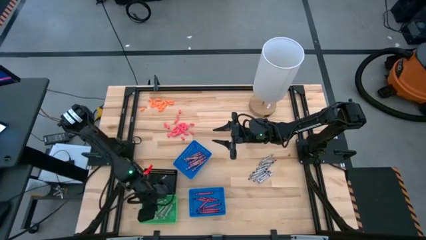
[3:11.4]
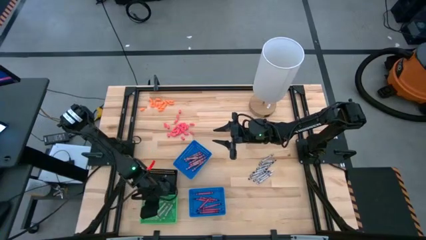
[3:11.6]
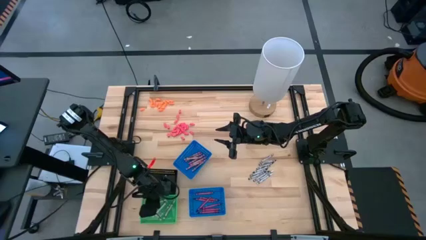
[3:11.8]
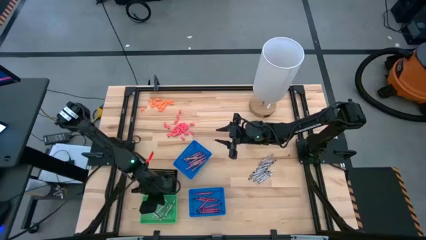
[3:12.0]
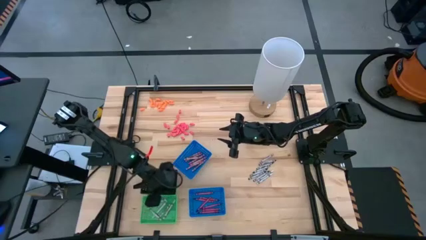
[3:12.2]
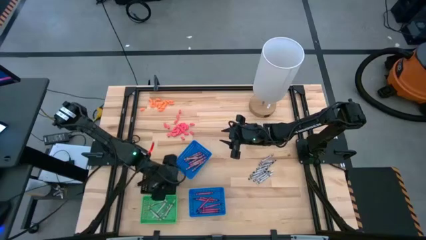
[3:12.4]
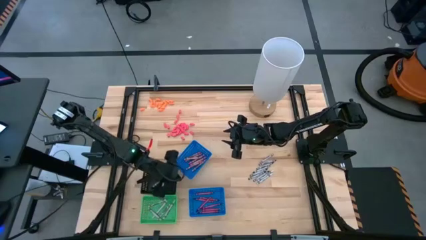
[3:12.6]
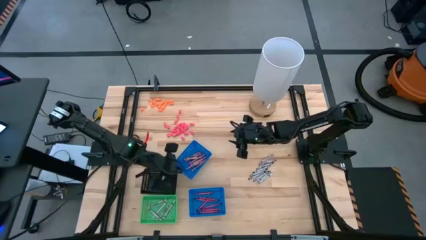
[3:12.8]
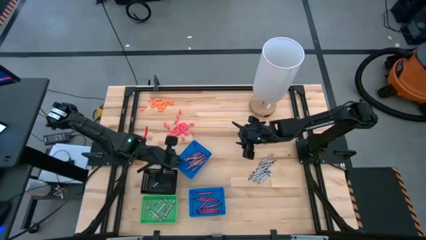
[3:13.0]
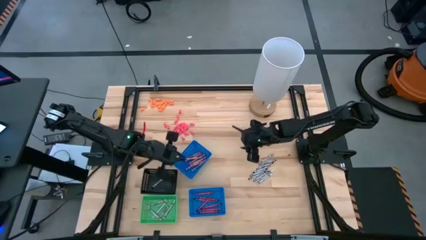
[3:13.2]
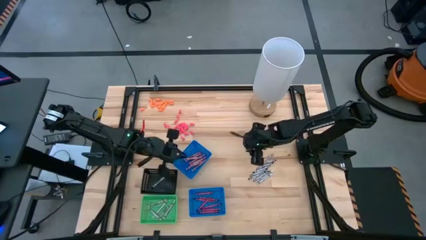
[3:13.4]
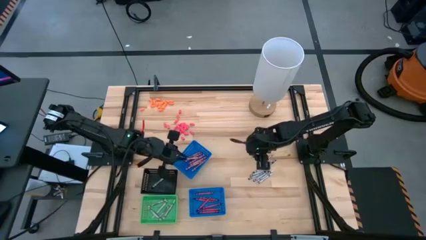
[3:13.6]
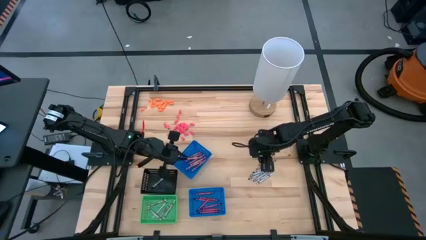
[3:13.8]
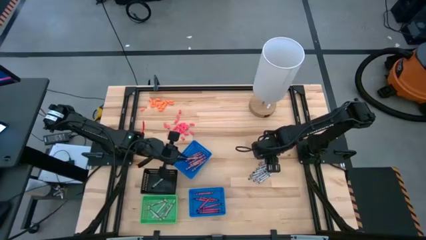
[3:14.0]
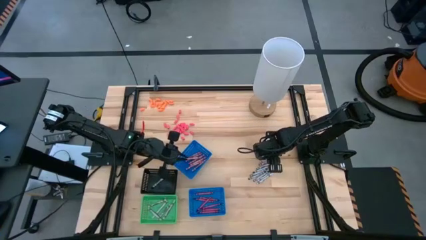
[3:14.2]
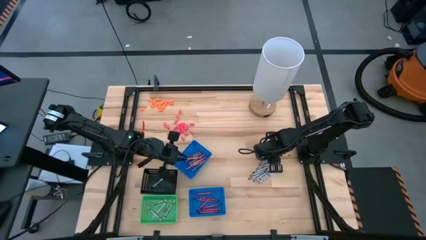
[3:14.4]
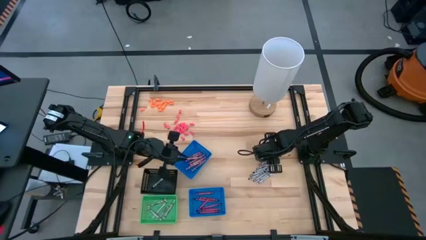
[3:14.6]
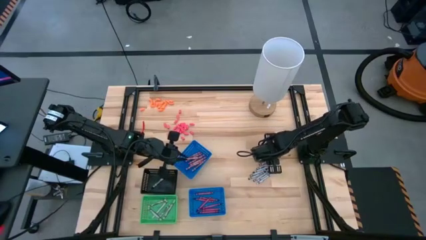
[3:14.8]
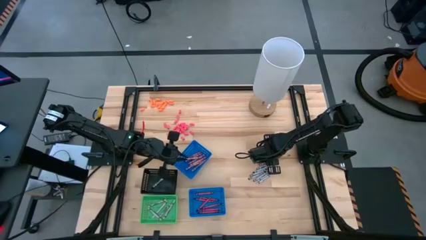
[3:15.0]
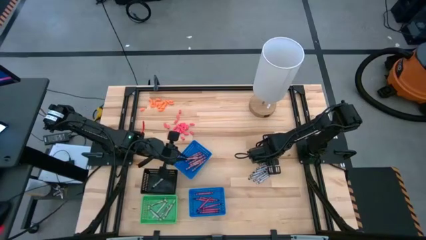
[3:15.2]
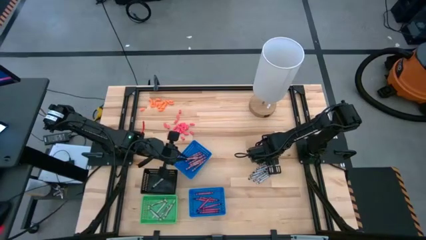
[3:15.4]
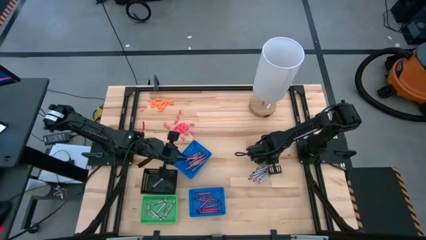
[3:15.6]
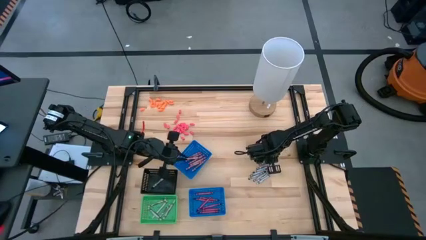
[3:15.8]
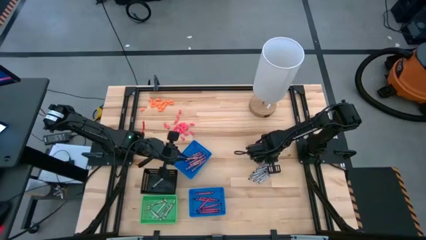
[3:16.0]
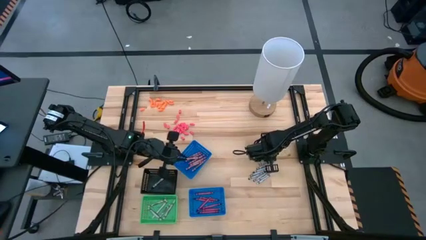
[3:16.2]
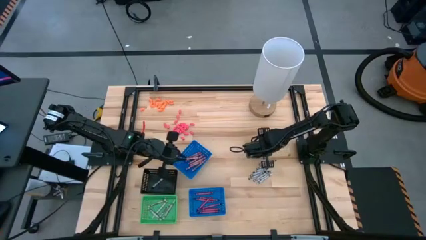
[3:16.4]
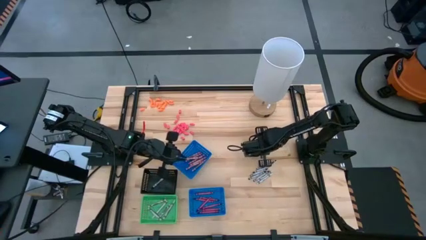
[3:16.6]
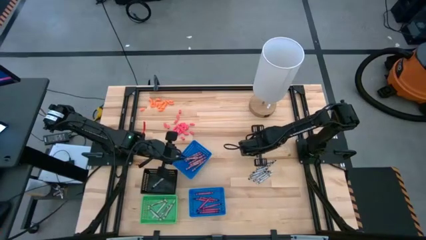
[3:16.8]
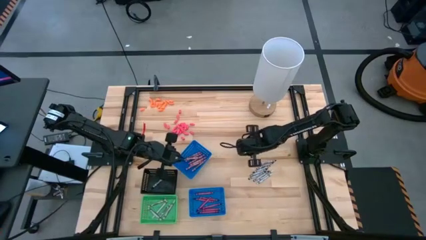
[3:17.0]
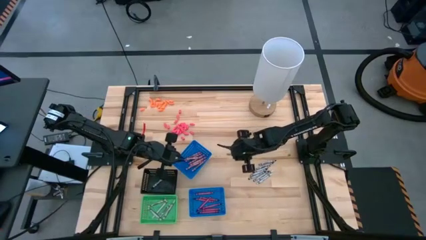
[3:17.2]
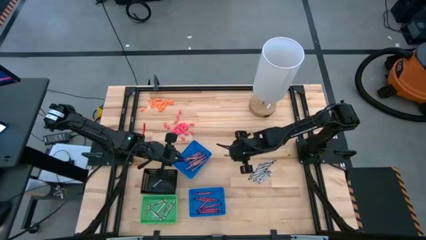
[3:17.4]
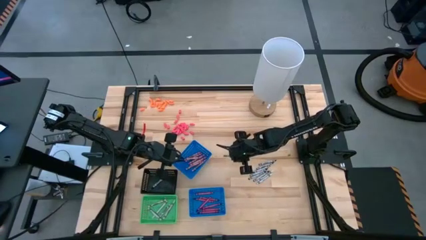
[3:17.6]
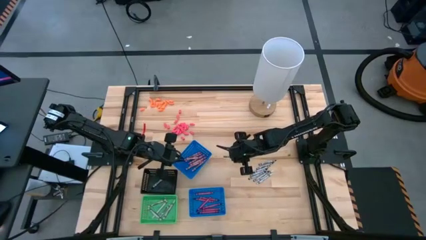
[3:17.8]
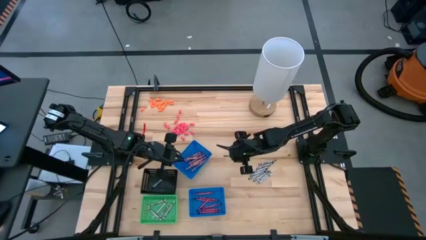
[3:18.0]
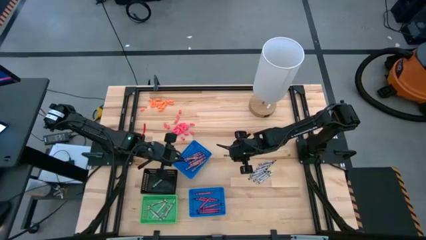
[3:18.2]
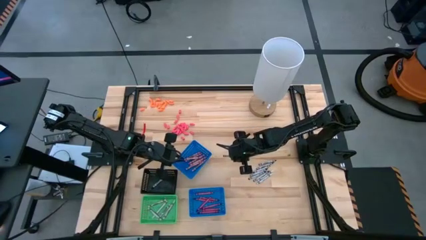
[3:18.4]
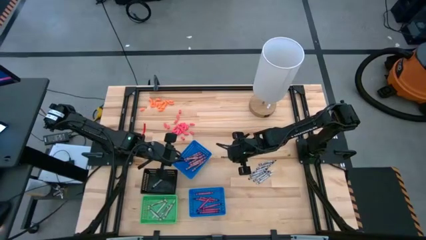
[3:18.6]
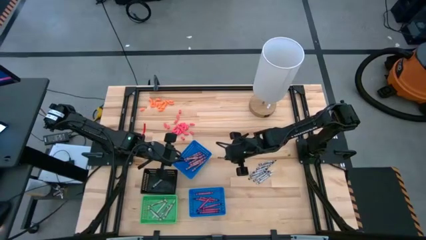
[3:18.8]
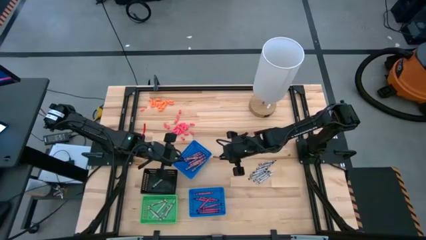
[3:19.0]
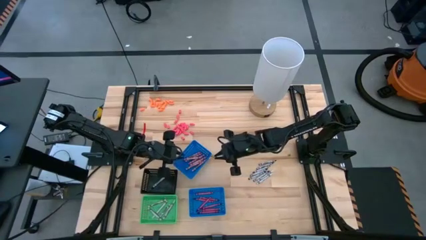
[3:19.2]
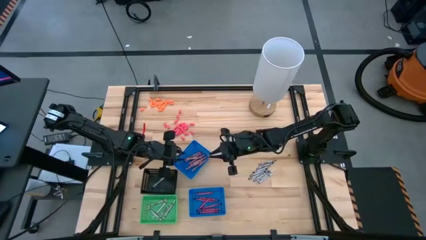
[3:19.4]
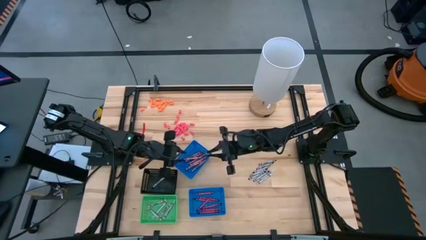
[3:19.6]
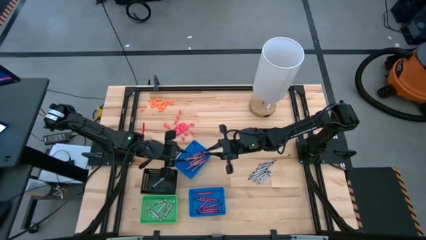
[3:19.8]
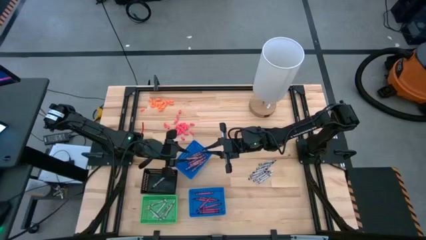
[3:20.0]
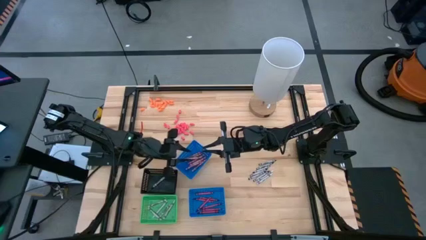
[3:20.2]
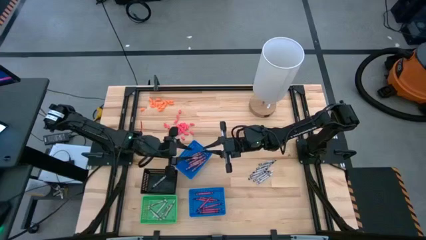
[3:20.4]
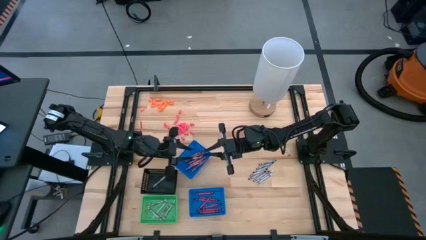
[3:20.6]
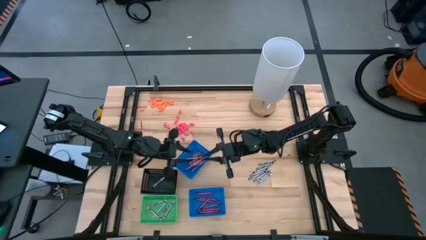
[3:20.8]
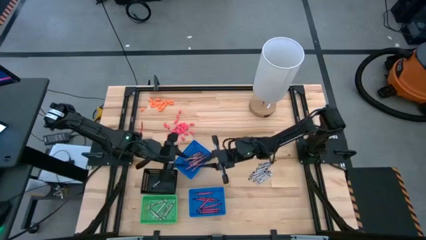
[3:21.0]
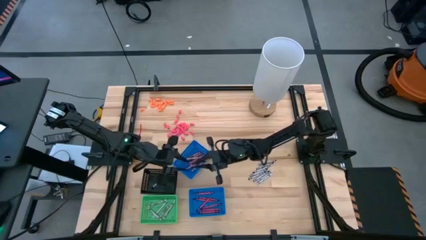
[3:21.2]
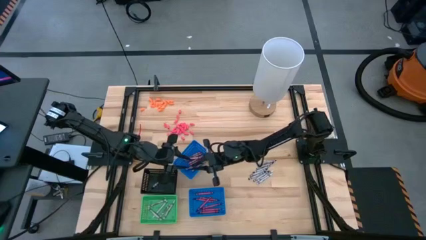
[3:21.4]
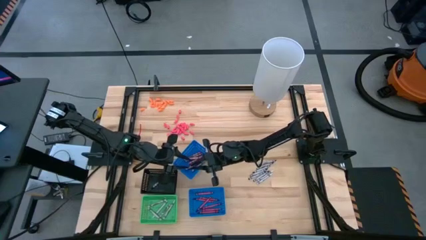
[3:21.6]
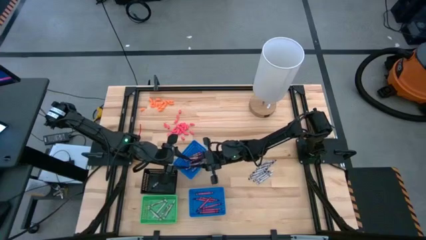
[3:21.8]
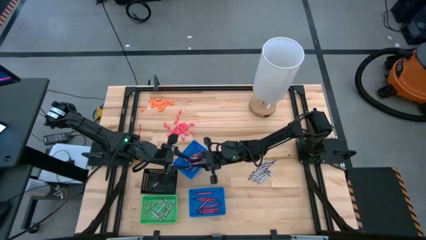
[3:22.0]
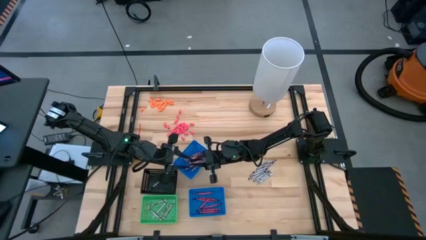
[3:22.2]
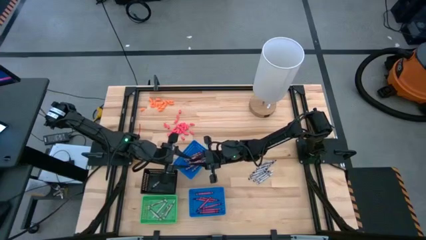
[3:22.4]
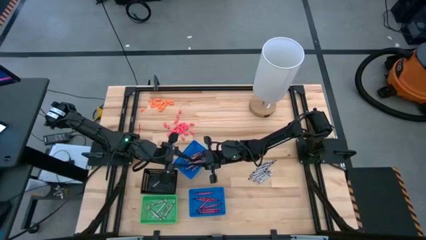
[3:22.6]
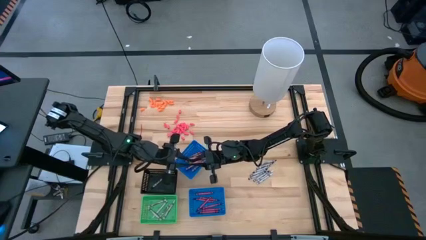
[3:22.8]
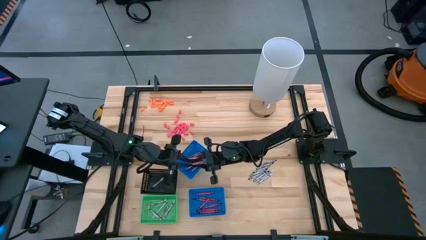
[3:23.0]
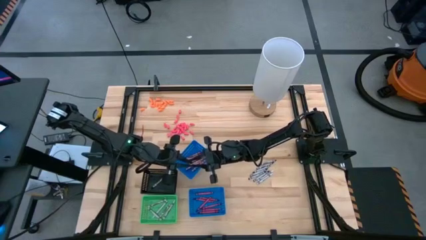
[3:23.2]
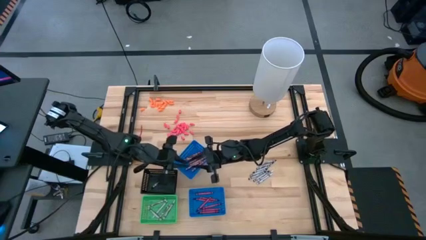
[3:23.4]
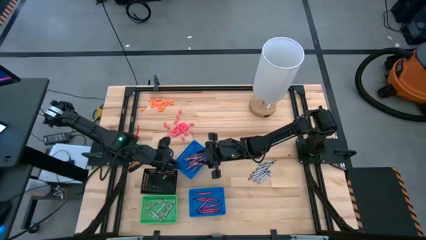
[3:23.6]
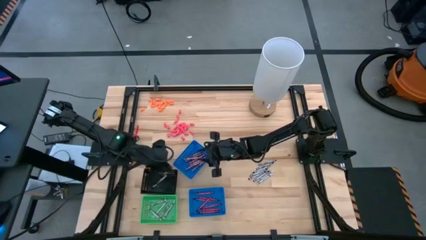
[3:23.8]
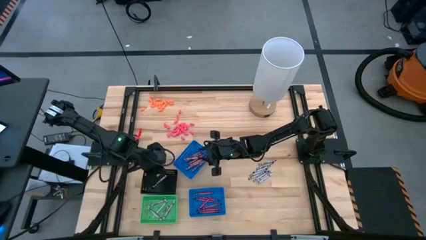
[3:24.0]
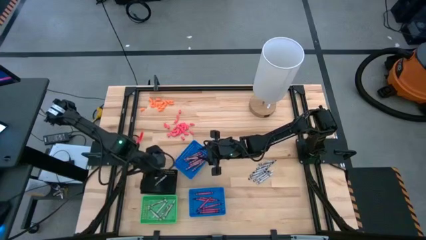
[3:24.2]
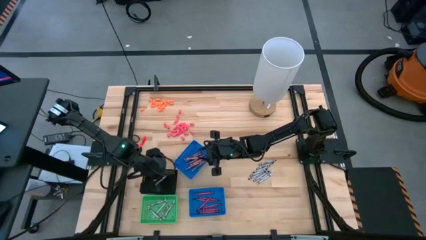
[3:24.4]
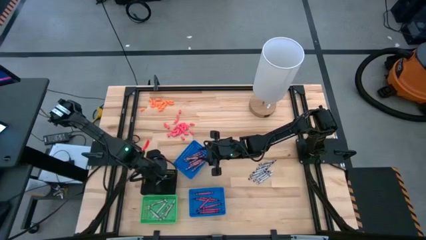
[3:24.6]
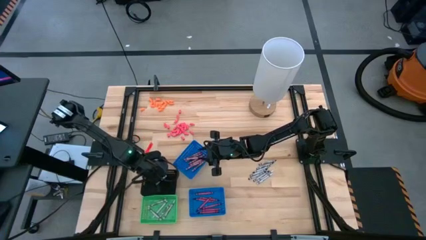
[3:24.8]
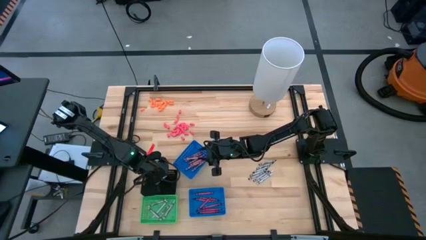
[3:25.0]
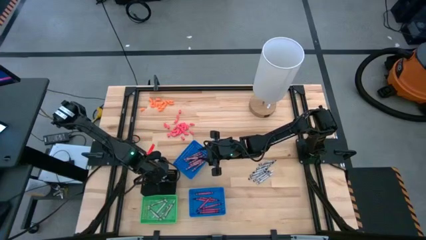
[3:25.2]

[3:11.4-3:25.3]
Task: Sort crayons
Put the black crayon into the black bin
